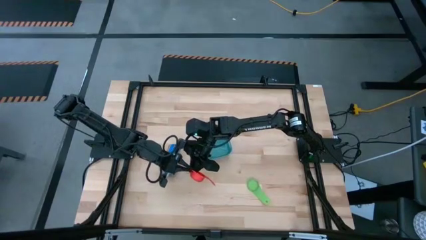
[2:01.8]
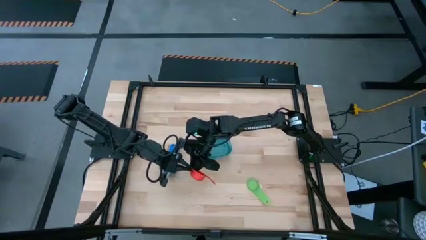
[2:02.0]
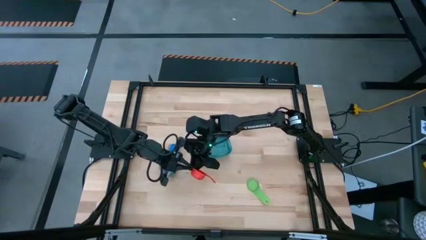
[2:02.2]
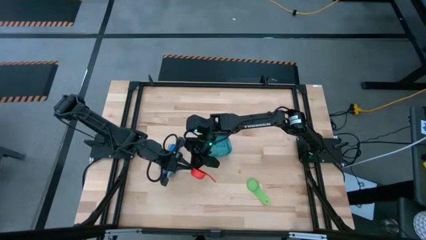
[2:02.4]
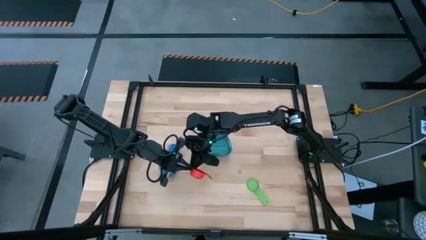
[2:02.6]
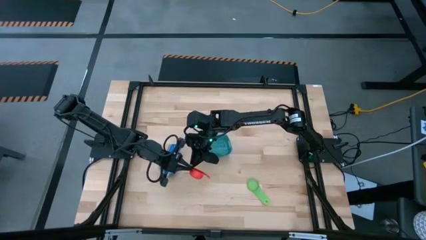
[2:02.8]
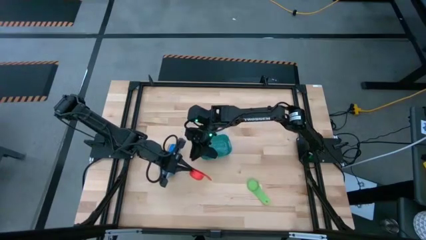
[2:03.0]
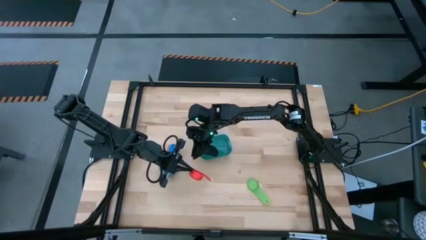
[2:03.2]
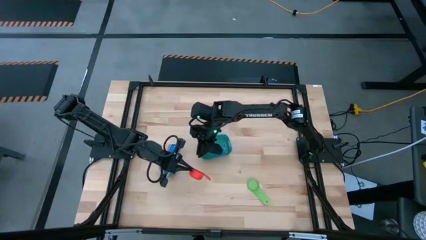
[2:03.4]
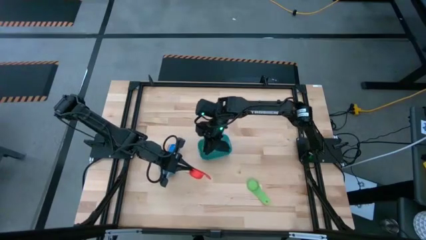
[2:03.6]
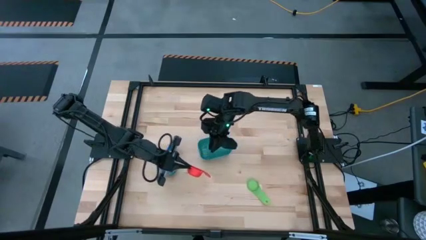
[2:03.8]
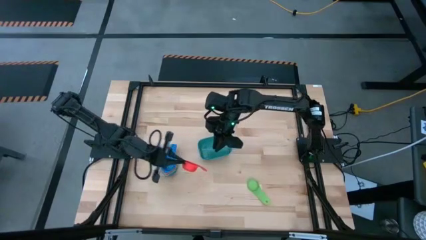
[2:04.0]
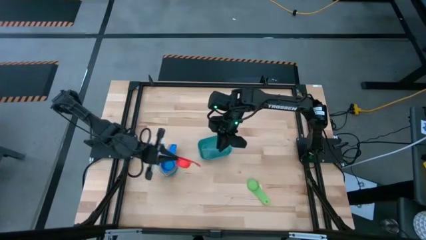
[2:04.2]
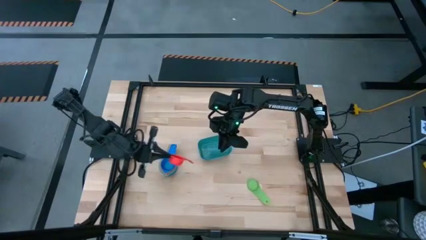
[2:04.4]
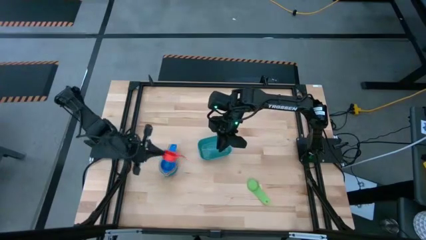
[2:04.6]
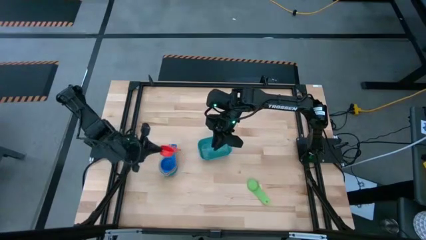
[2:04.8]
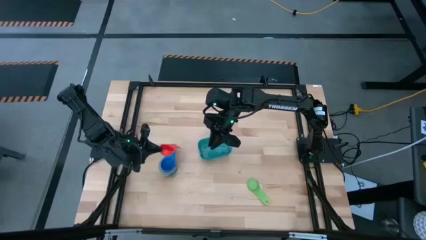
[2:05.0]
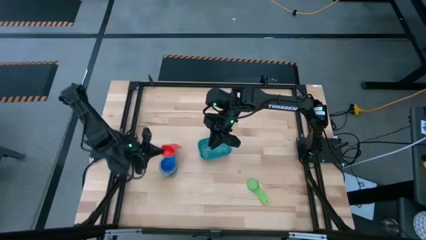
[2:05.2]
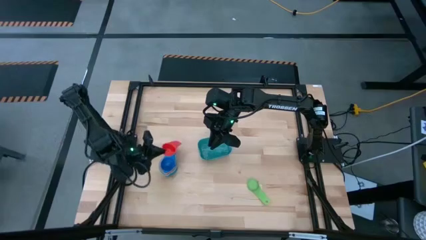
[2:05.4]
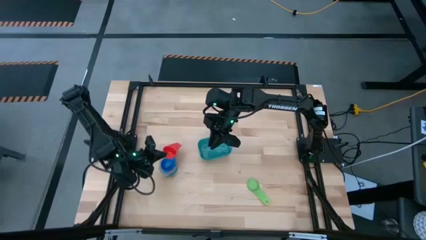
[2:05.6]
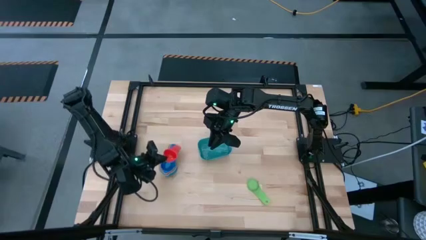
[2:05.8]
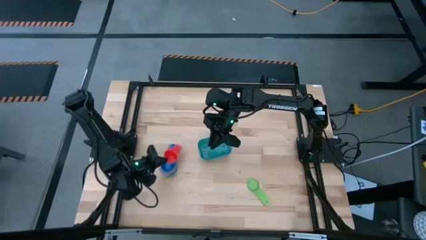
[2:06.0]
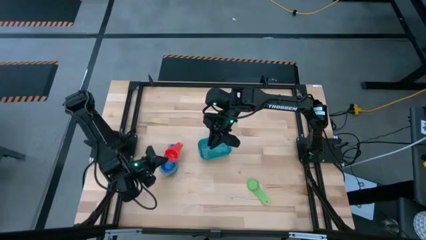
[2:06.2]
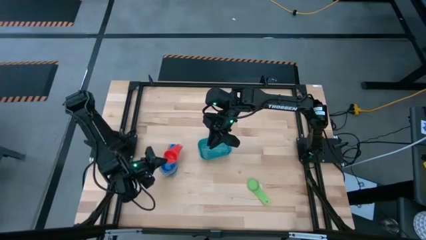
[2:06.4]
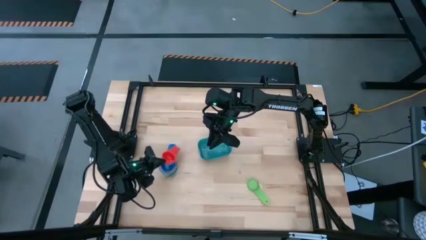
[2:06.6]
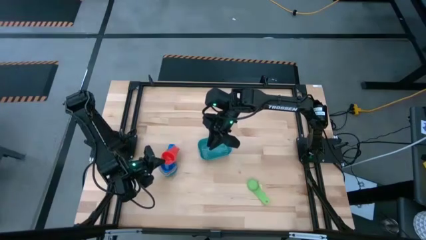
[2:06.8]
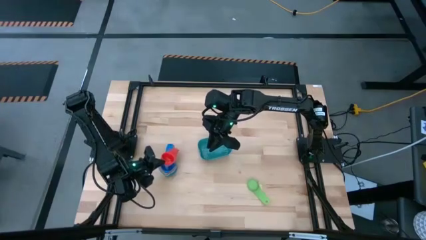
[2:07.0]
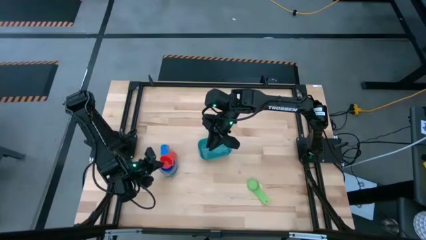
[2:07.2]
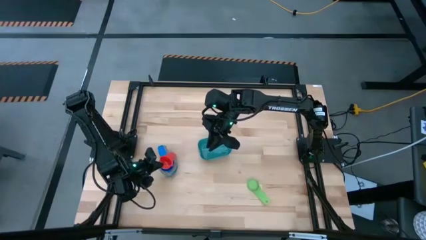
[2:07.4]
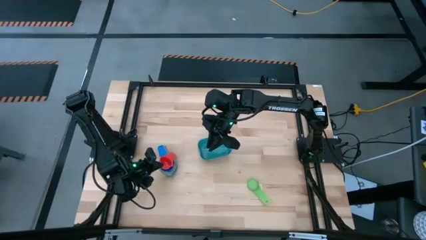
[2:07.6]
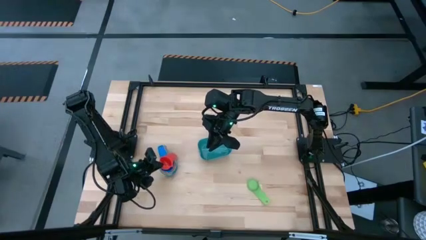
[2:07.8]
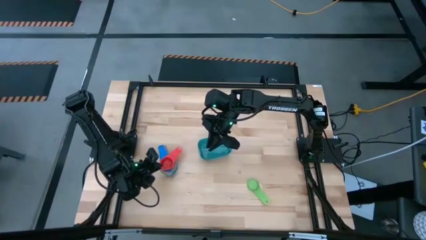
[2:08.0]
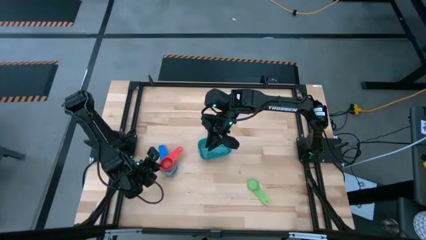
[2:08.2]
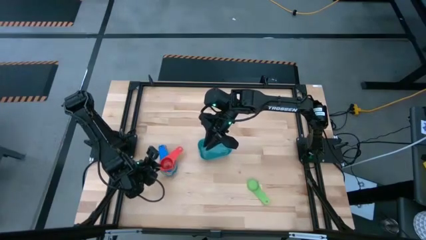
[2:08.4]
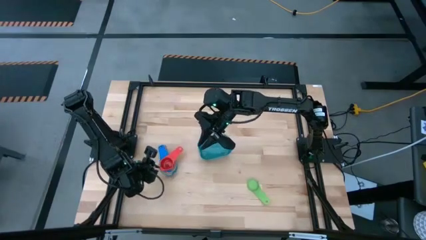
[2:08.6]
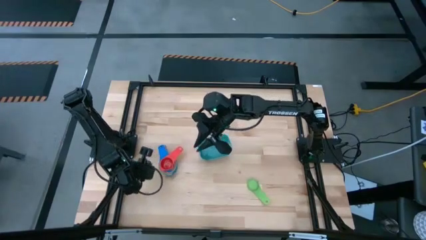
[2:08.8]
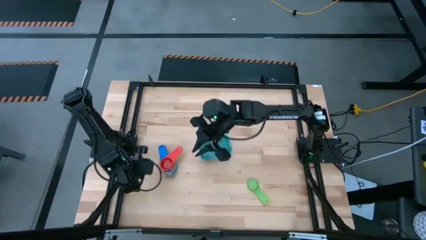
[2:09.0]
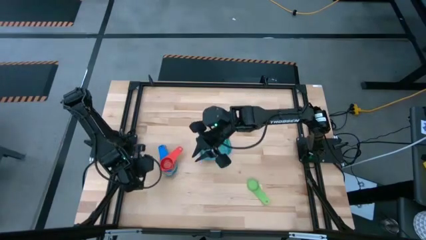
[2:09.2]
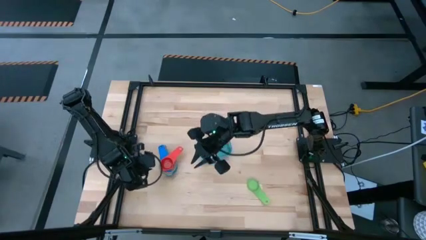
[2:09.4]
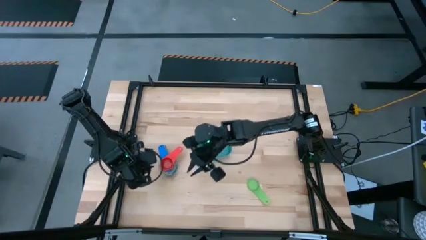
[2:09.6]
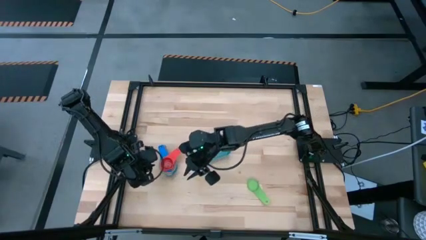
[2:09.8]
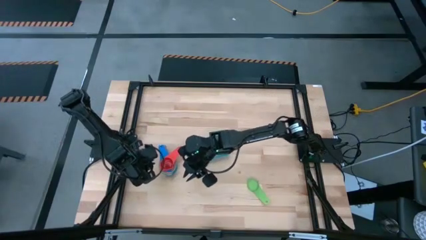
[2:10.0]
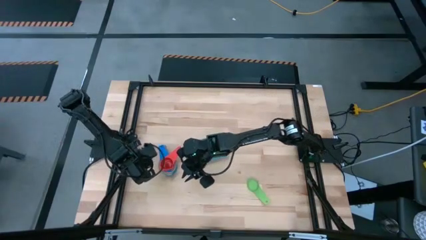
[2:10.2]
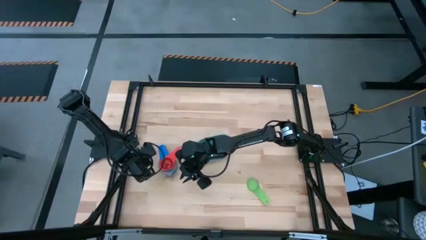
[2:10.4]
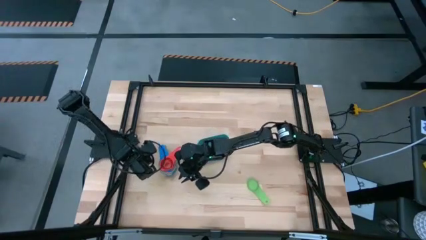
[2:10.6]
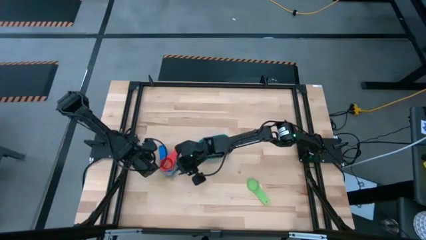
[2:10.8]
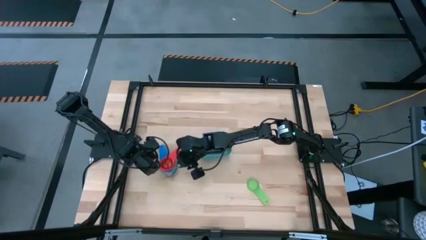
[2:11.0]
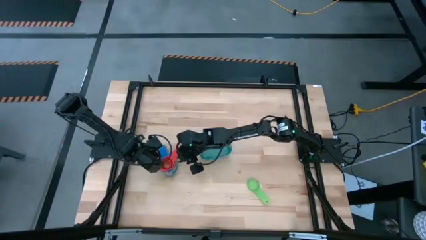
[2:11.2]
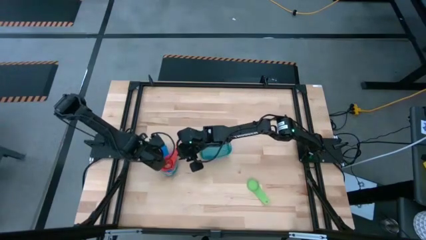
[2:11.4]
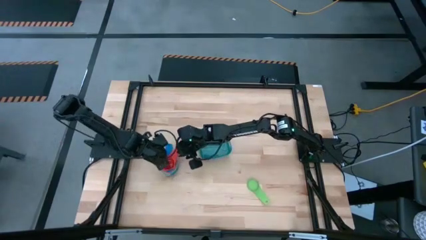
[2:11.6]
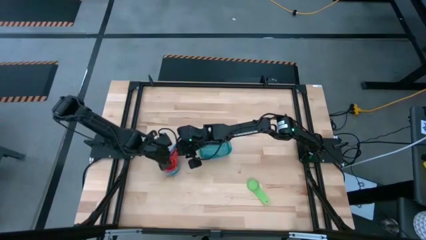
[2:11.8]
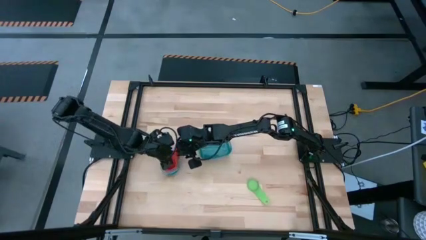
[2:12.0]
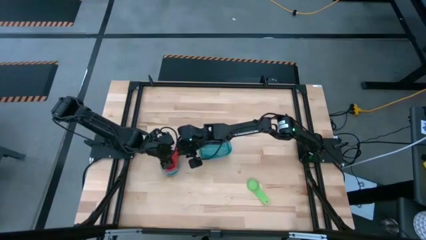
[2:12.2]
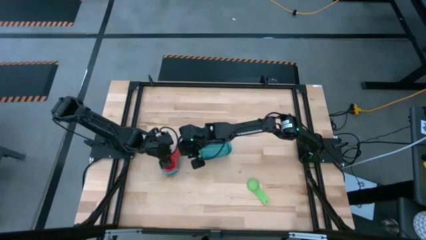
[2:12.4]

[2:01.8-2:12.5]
Task: Nest measuring cups in basket
Stack the red measuring cup on top of the blue measuring cup

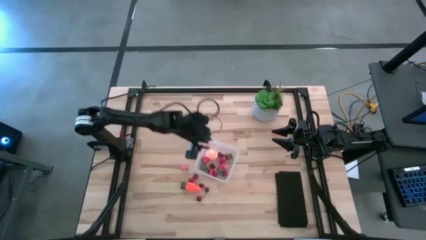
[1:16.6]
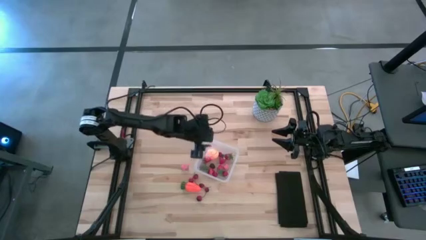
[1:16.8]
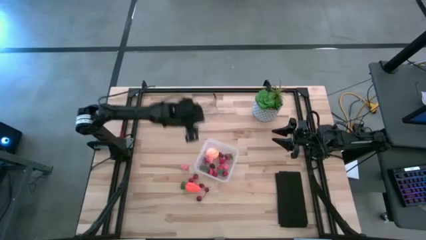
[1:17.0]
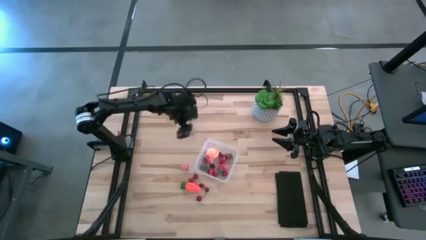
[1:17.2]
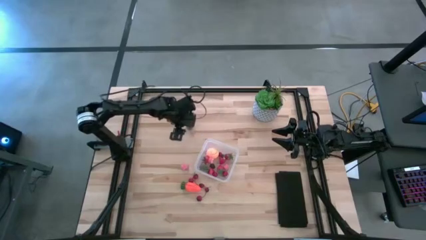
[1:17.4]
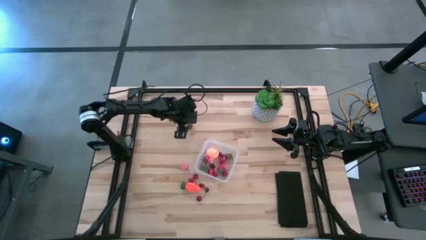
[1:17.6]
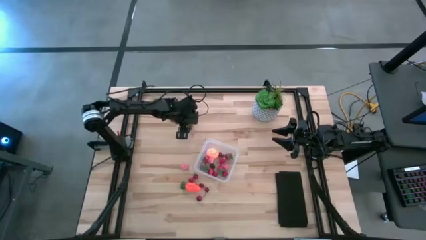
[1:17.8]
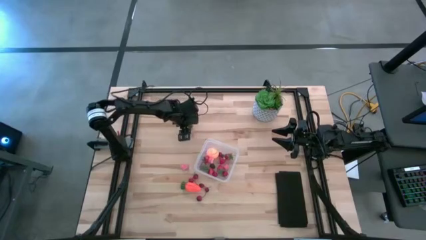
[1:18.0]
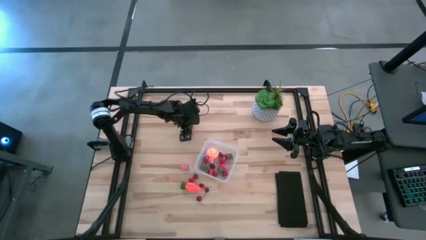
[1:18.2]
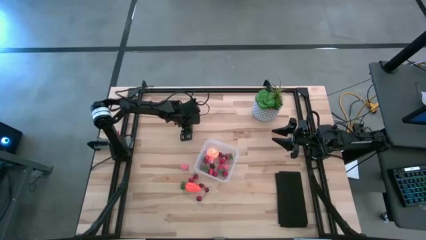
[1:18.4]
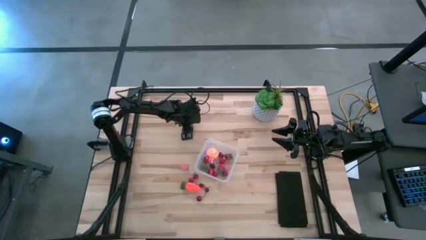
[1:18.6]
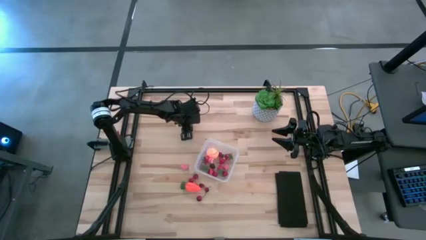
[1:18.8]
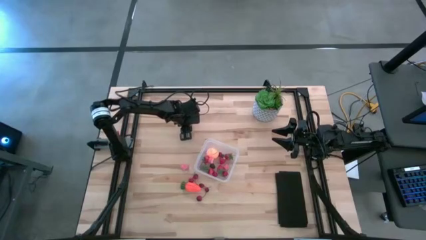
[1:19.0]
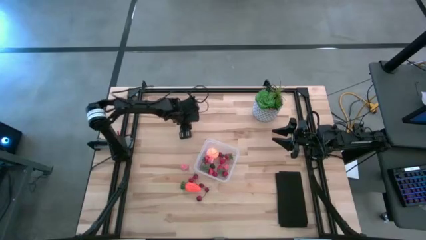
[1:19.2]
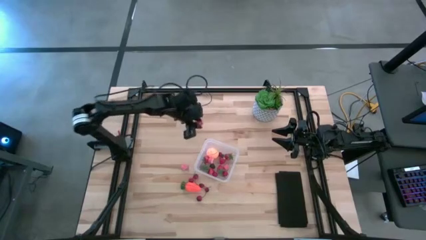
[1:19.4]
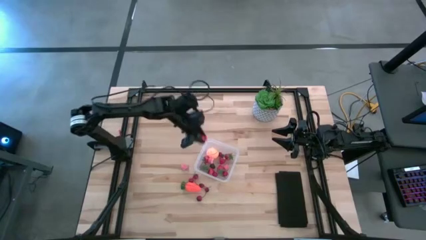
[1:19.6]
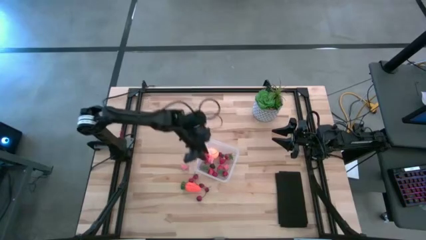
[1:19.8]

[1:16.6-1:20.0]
Task: Pick and placing Produce into tupperware
Put the red strawberry into the transparent container

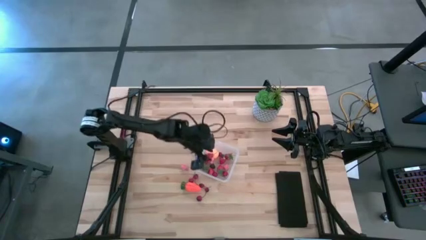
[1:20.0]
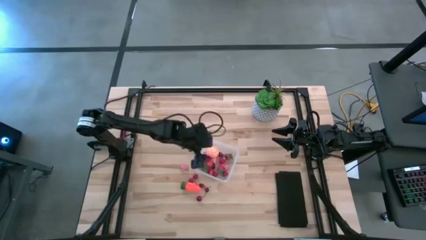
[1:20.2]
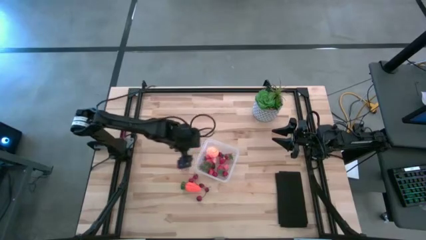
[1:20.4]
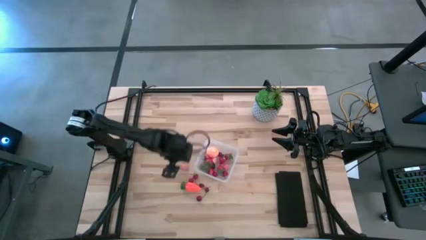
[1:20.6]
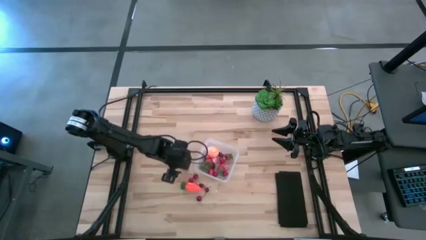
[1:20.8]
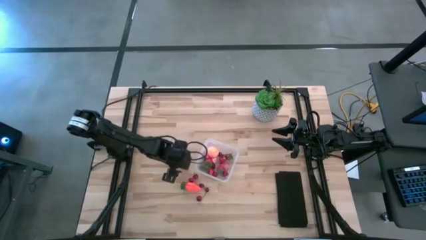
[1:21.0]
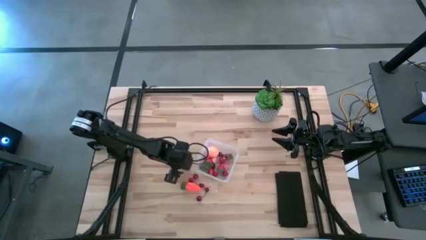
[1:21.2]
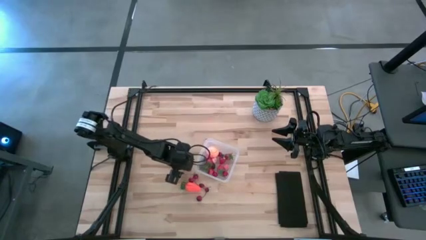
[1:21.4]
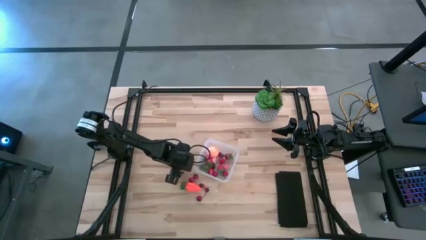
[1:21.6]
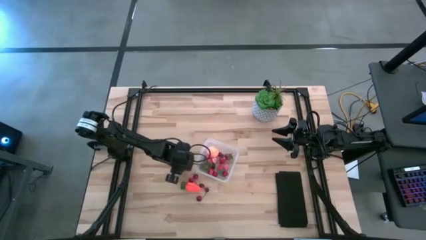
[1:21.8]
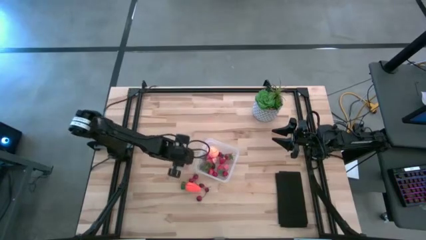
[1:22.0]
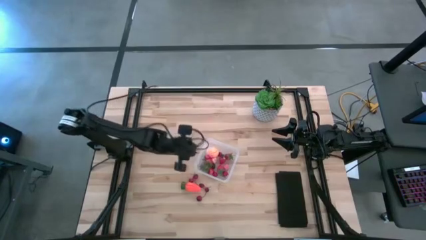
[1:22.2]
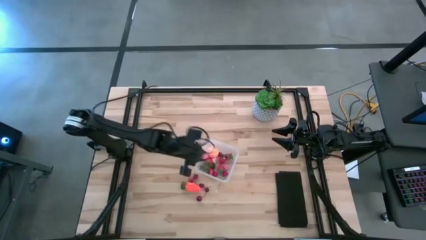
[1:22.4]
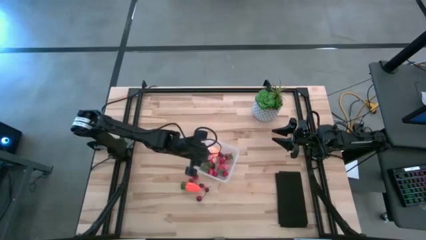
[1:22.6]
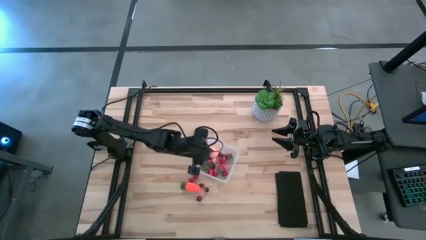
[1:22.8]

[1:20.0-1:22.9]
Put the pink peach into the transparent container
